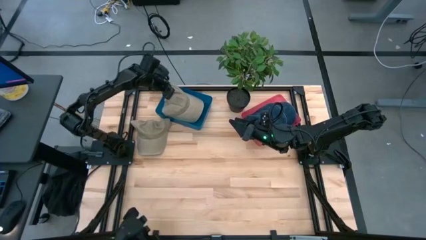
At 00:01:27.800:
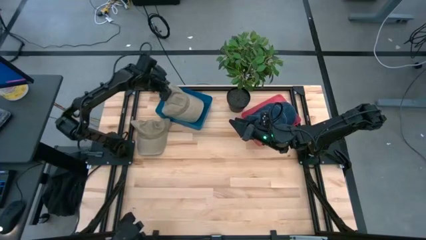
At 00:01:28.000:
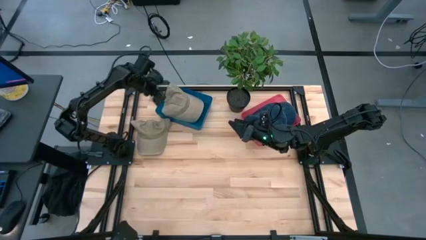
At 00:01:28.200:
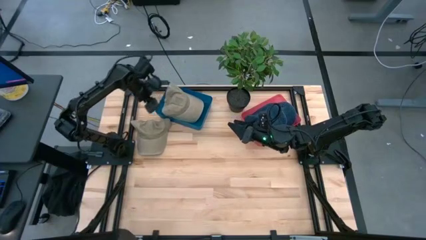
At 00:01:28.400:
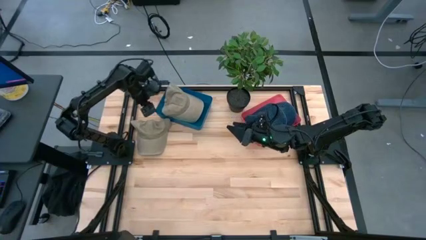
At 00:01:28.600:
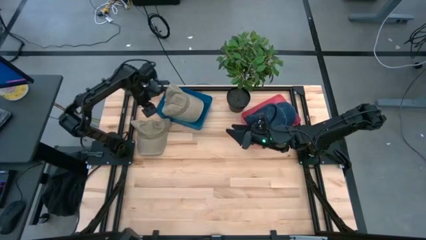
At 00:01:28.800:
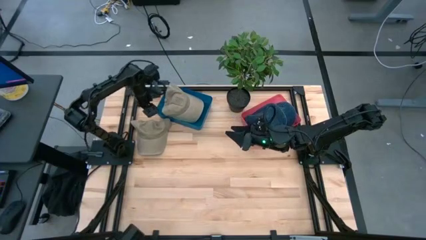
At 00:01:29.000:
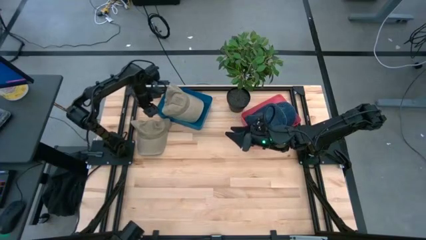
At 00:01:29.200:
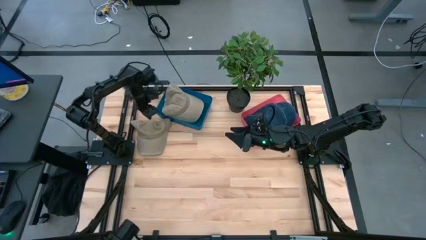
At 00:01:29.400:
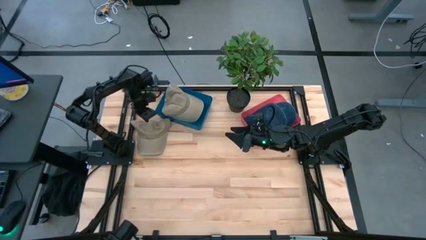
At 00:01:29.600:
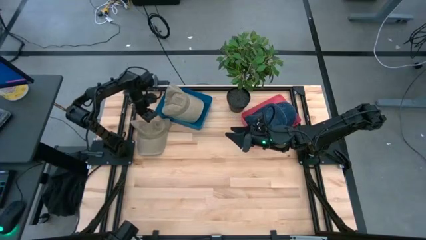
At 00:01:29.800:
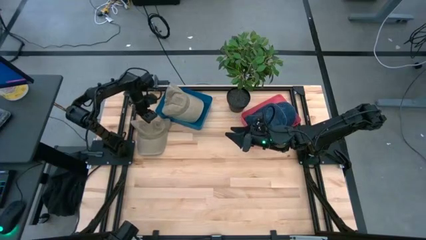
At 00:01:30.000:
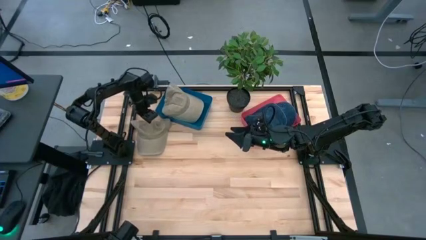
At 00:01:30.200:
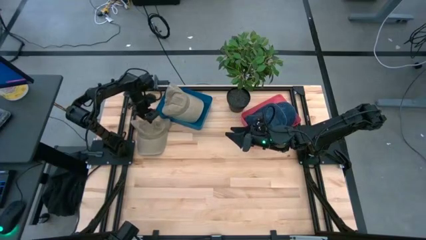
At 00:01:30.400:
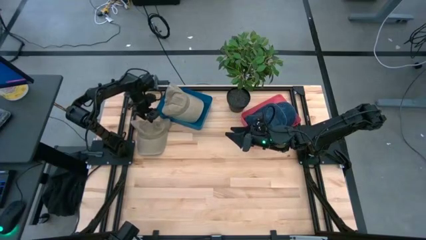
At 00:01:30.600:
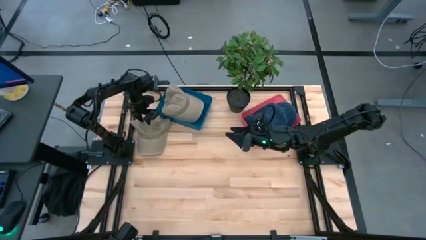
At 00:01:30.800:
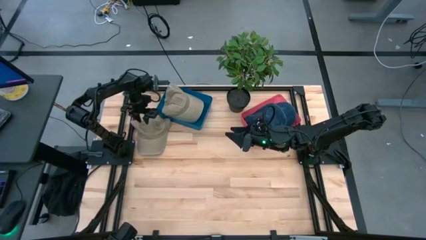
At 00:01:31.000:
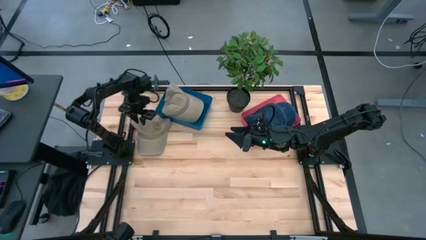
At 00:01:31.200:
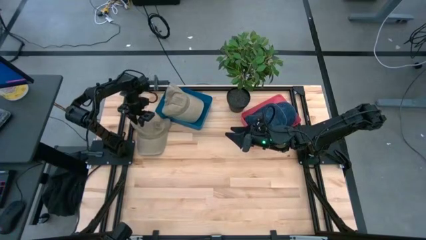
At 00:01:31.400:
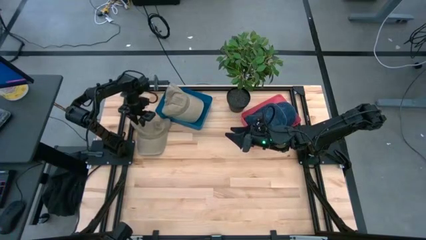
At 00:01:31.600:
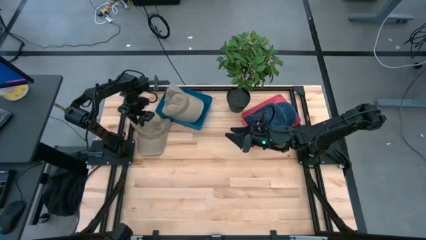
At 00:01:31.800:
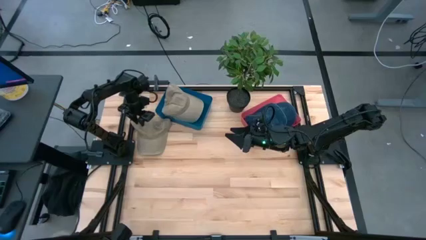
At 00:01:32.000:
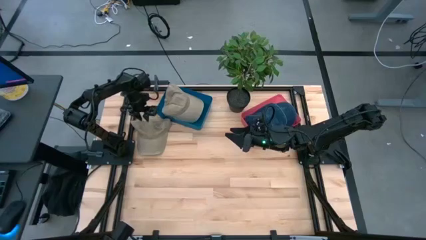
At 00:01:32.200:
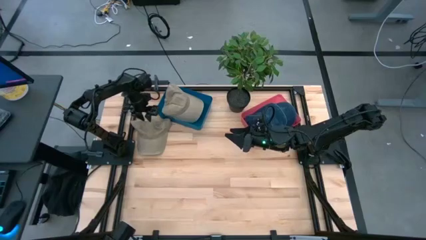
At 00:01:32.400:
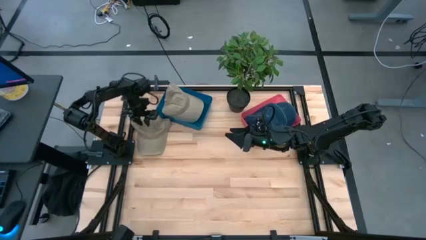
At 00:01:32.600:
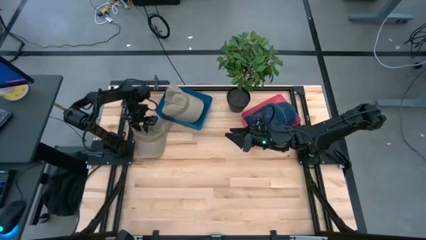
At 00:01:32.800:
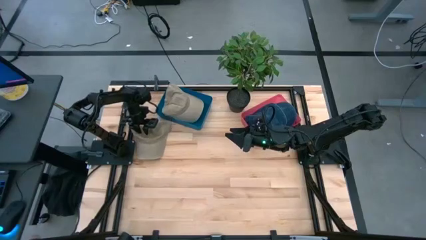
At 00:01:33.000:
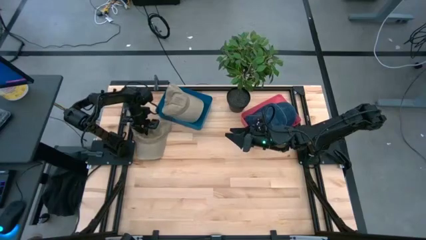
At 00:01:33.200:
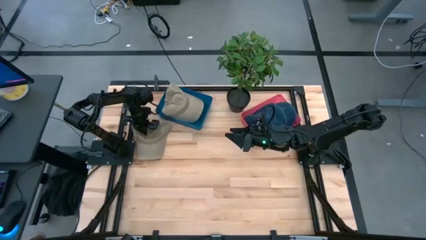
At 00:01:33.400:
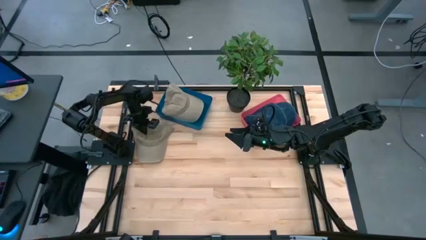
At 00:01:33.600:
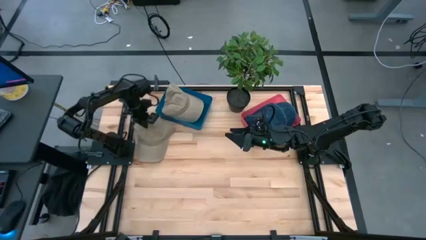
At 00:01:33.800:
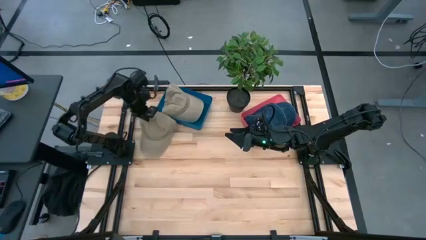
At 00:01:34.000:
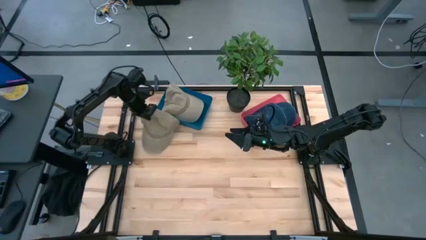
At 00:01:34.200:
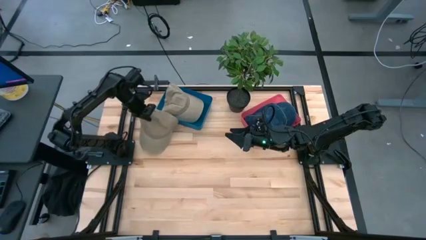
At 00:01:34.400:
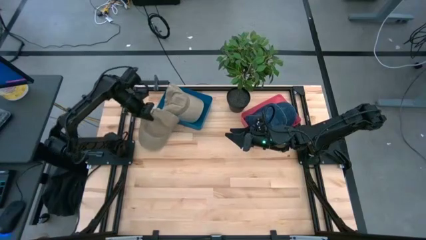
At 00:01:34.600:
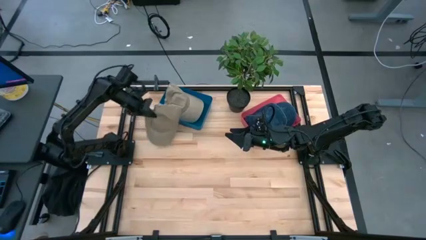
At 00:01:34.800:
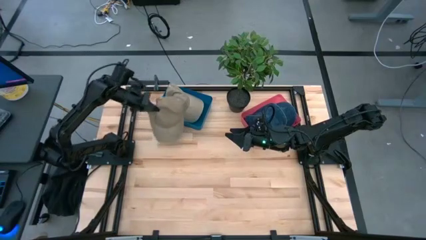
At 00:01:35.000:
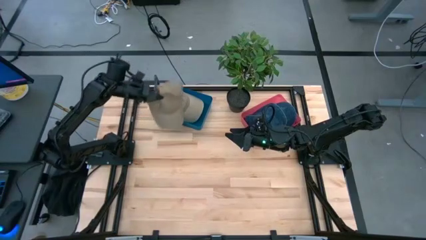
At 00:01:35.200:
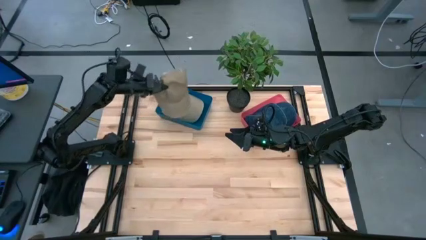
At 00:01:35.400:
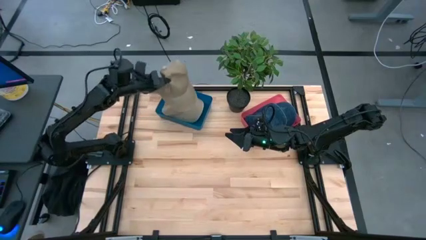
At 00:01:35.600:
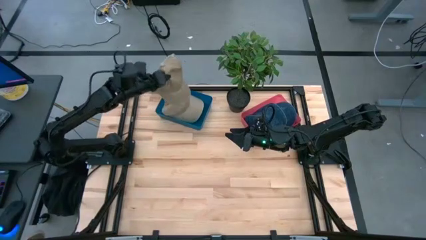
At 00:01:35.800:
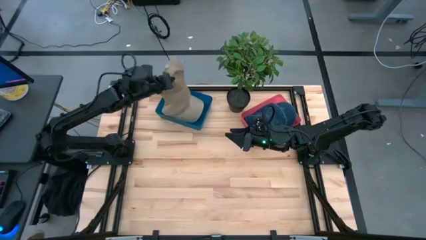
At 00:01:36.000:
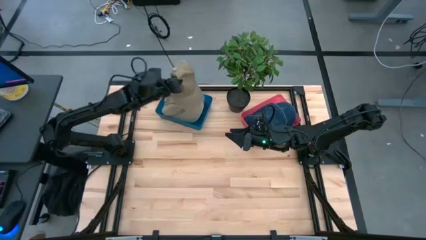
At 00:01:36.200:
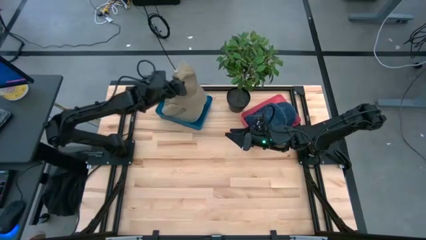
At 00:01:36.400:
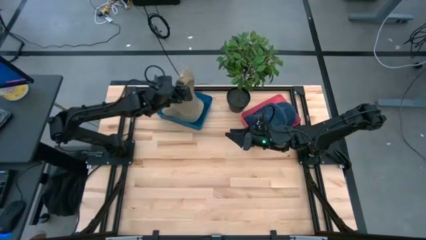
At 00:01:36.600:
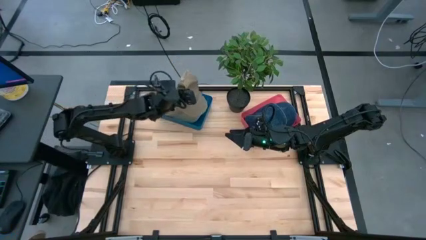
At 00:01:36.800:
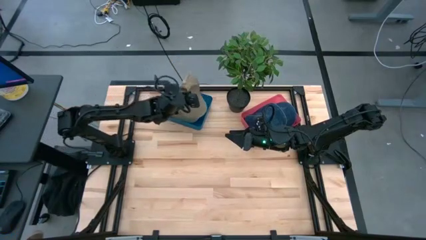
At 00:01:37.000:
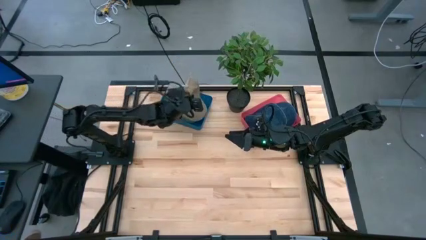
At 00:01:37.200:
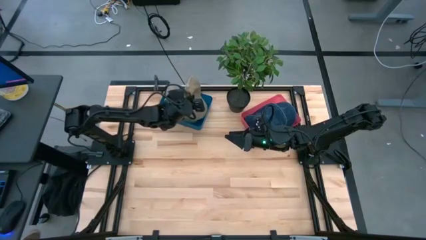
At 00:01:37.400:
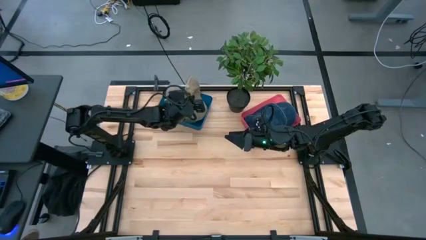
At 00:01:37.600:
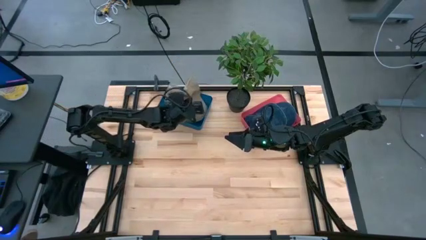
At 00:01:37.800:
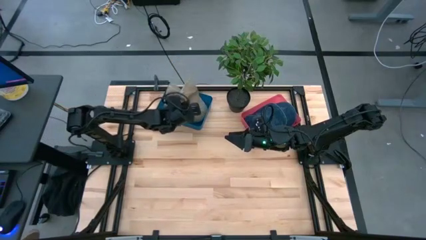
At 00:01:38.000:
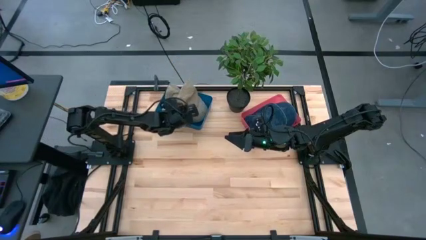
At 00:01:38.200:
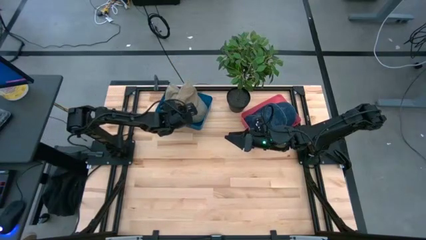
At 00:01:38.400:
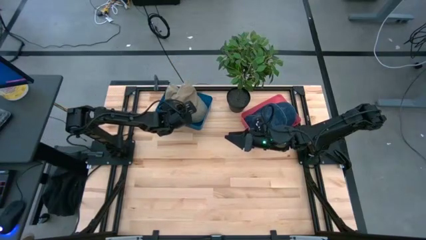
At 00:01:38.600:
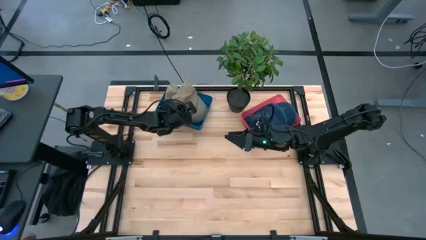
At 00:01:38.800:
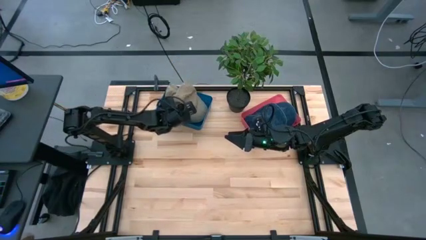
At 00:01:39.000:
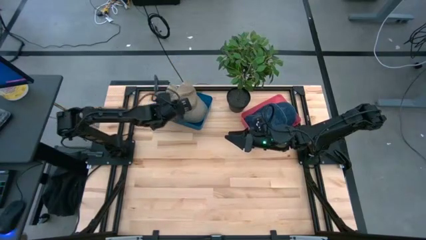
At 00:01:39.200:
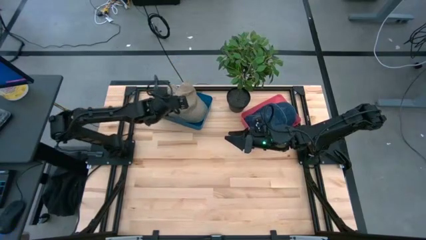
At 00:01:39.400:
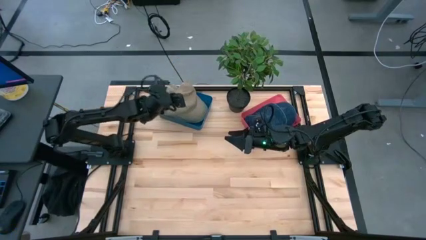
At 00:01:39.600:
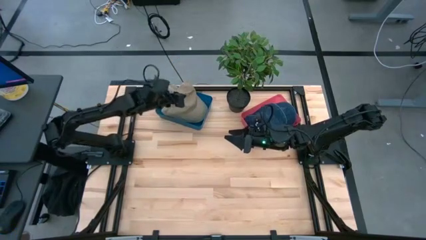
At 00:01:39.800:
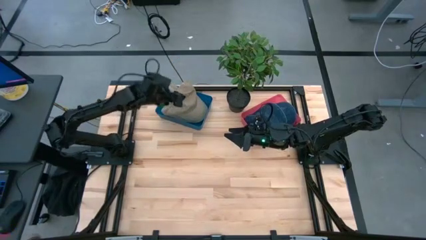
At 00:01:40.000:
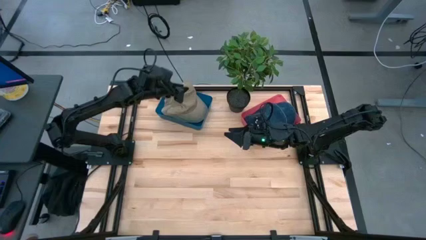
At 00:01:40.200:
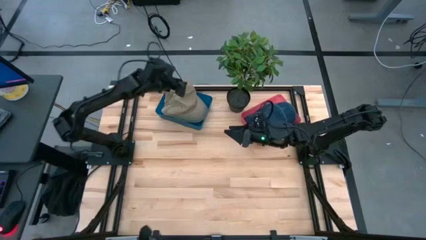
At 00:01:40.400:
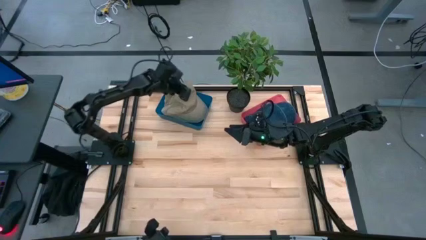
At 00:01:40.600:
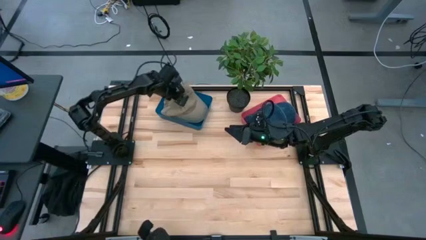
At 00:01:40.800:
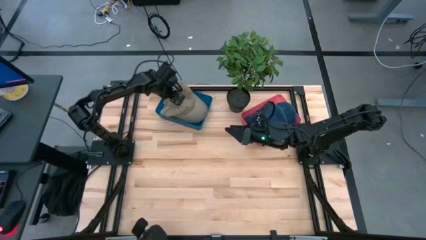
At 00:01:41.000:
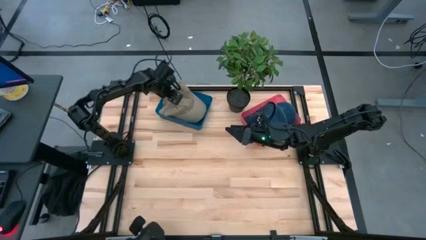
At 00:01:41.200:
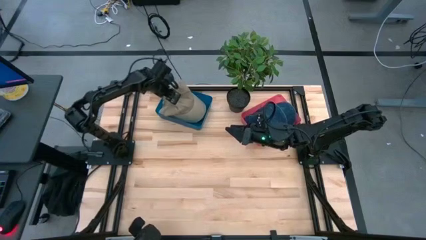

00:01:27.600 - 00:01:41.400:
Task: Pick & Place hat
Put the brown cap into the blue bin
